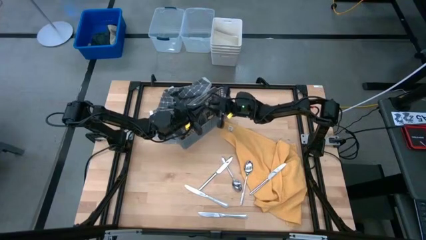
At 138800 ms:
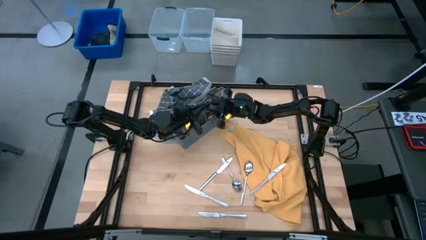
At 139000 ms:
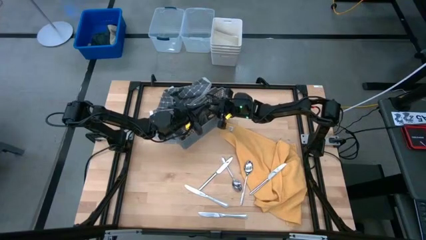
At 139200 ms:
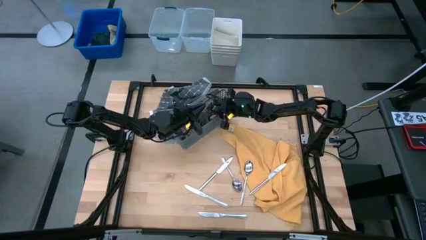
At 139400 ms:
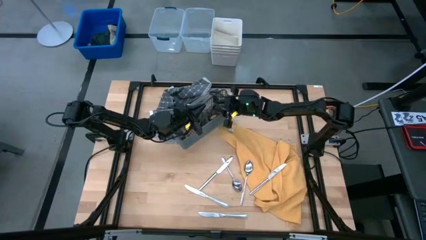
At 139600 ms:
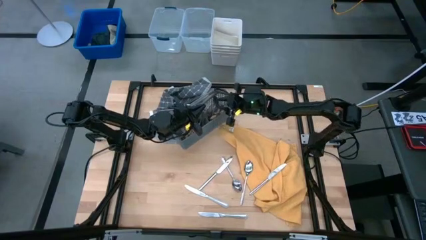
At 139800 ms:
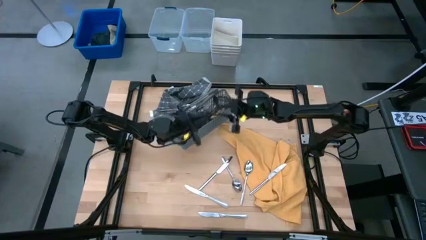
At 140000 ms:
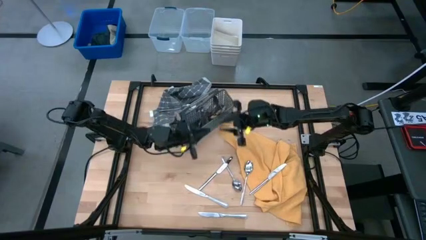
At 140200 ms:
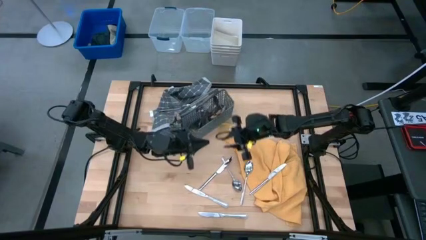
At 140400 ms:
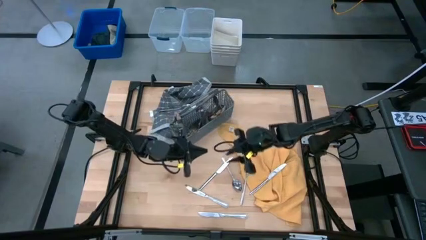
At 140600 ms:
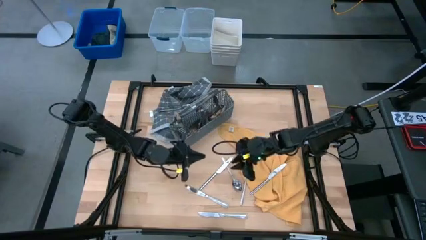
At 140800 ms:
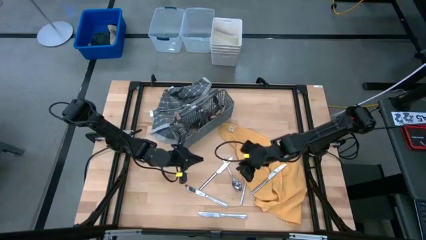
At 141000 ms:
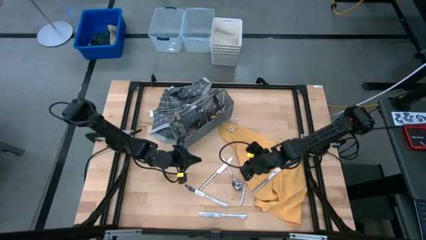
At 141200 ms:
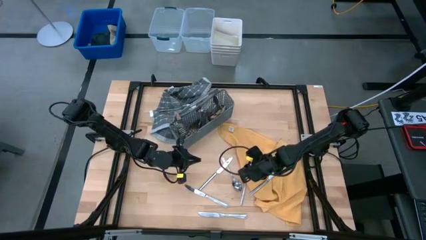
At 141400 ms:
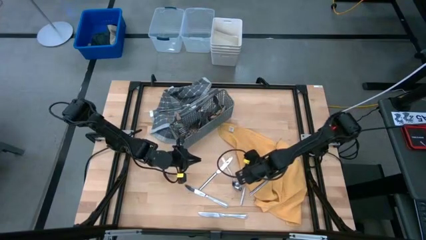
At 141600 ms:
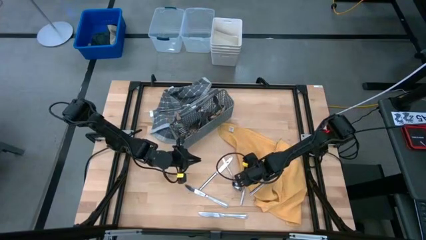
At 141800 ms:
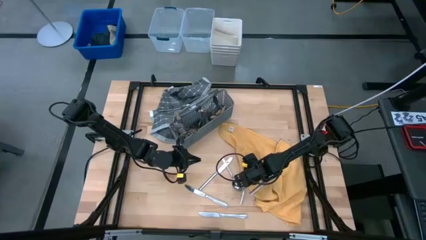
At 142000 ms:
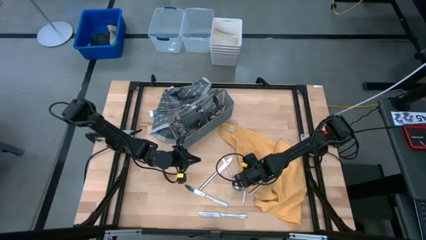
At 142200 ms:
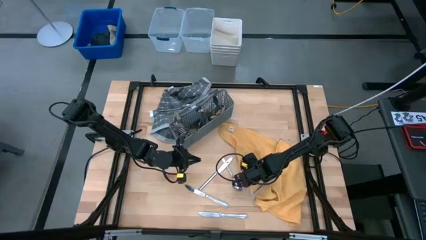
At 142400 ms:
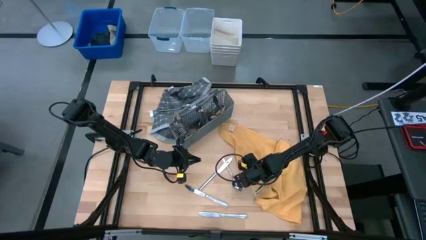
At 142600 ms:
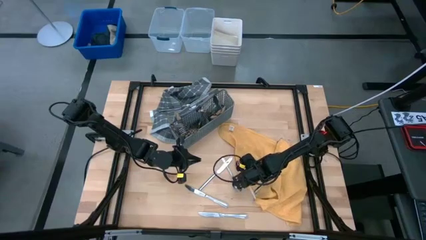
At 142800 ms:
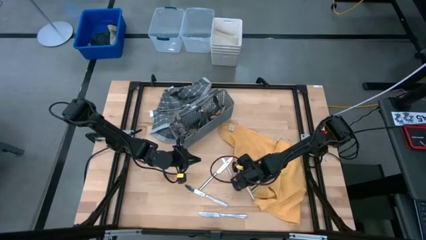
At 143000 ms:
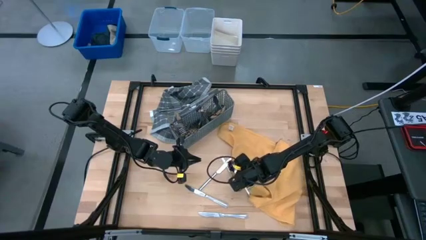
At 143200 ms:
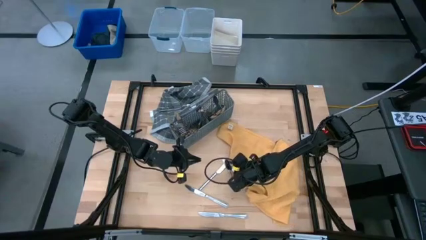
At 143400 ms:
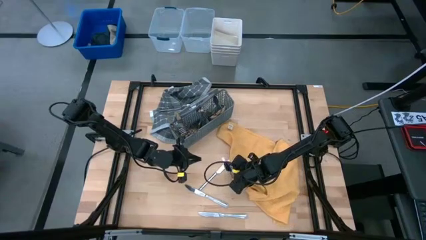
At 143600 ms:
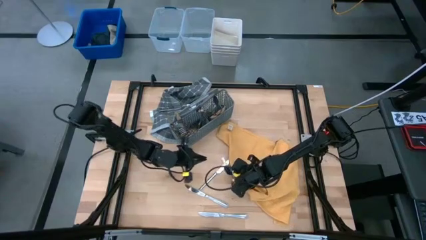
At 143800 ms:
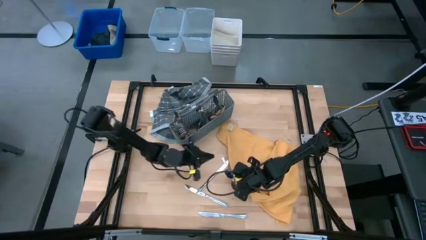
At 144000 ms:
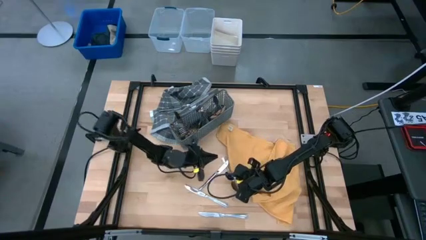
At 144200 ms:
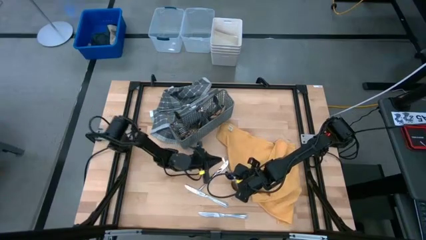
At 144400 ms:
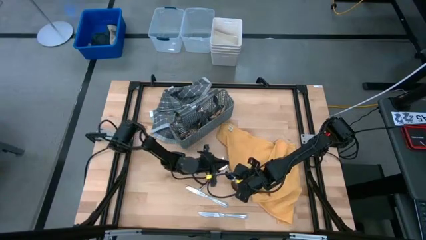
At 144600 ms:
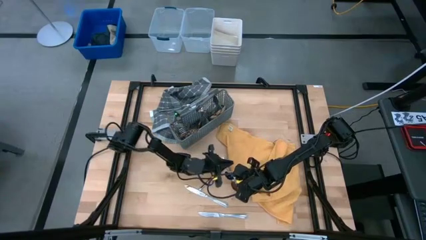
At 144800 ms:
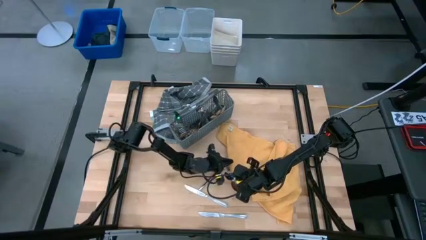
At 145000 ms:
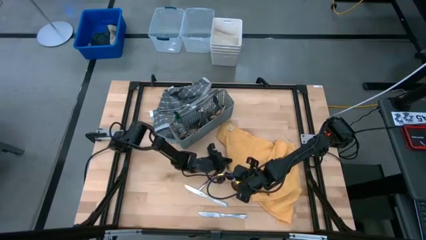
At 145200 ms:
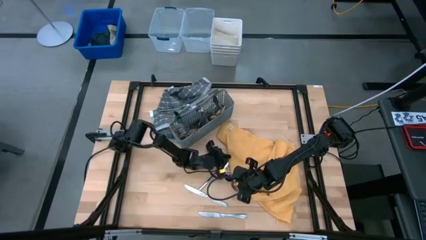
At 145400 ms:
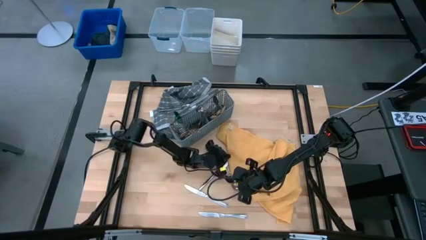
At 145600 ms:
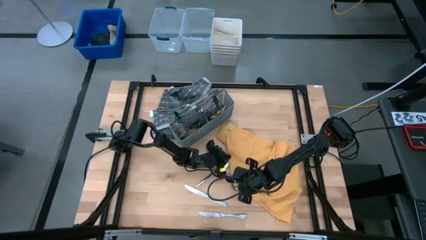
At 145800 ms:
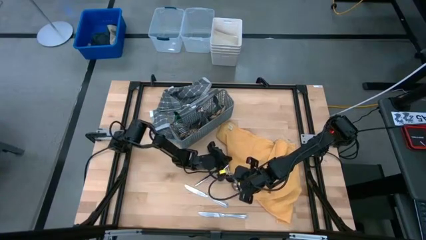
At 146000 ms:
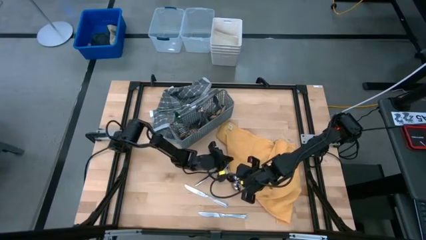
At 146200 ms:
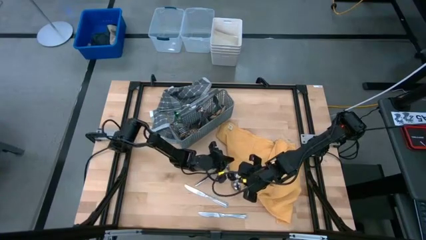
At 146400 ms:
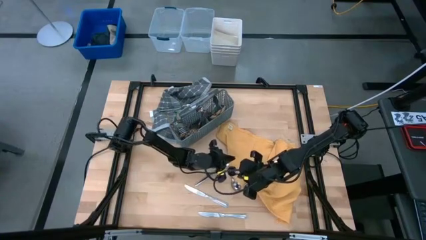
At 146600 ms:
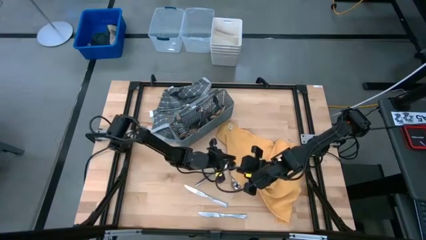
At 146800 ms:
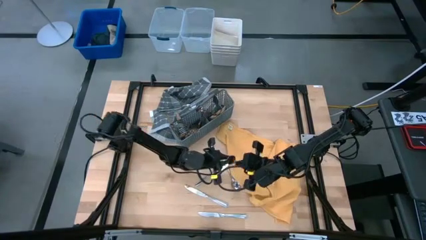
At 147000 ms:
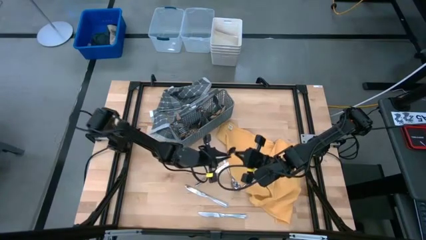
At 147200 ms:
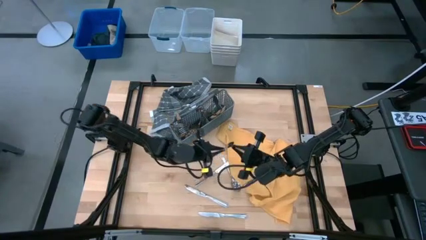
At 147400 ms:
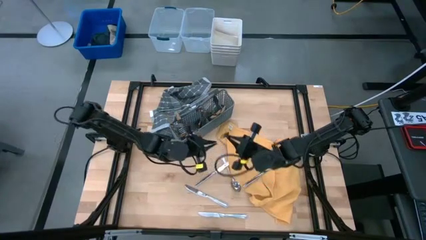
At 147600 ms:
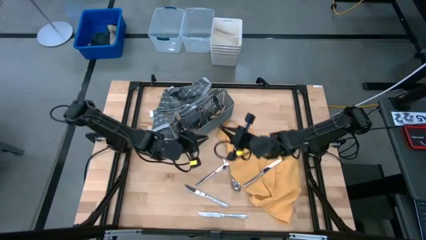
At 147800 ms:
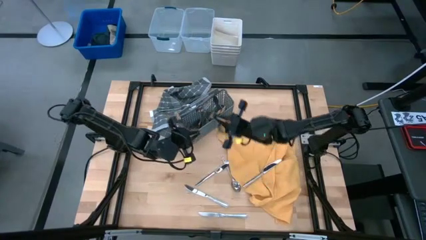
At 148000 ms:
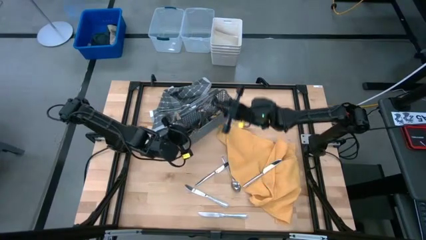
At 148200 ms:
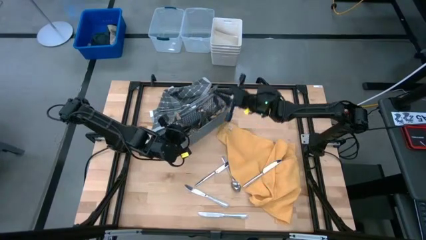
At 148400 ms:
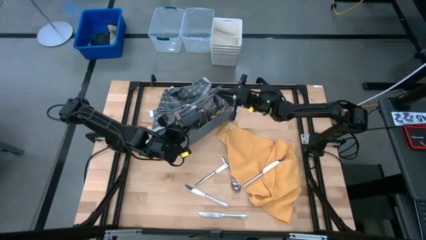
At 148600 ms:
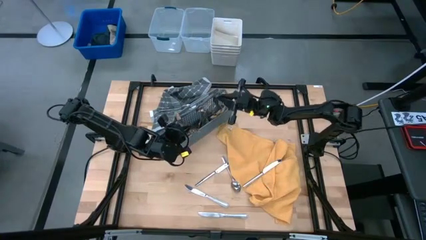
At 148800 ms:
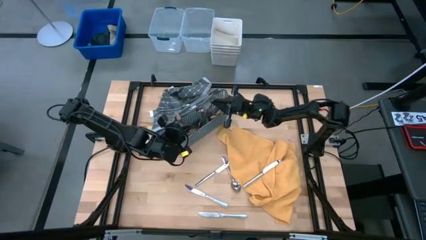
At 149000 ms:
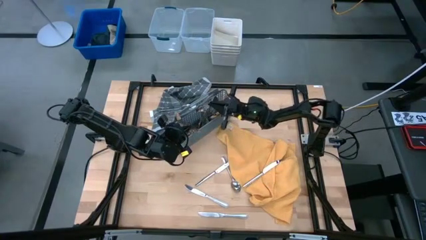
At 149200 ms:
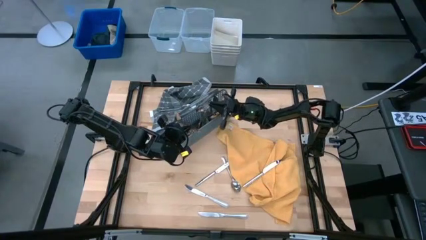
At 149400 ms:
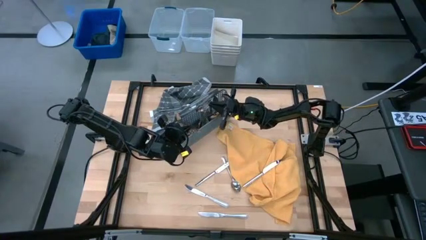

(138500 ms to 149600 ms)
Task: Sort silverware
Put the silver spoon into the gray silverware basket
